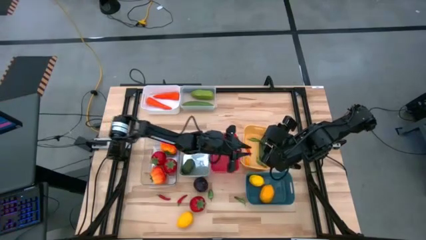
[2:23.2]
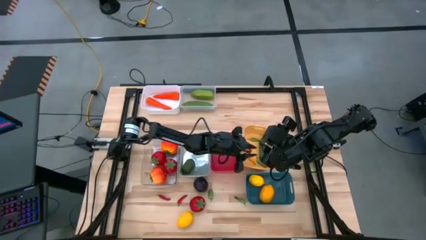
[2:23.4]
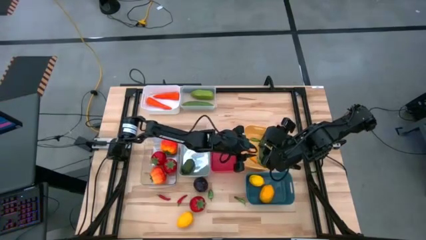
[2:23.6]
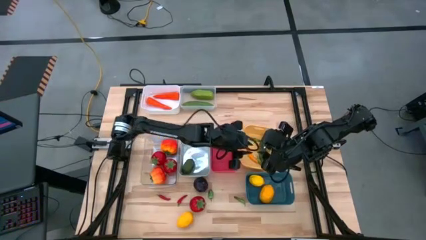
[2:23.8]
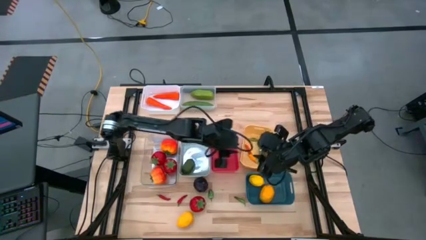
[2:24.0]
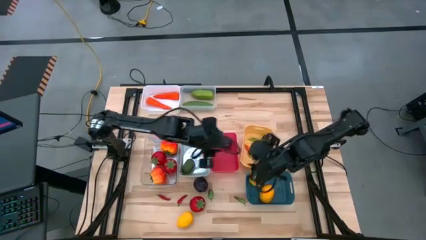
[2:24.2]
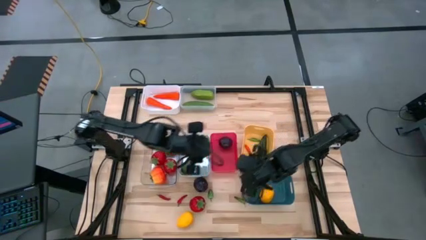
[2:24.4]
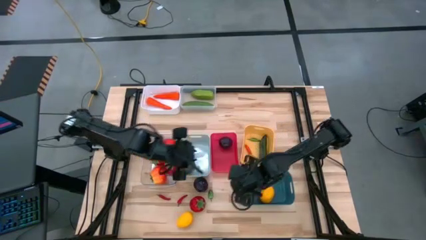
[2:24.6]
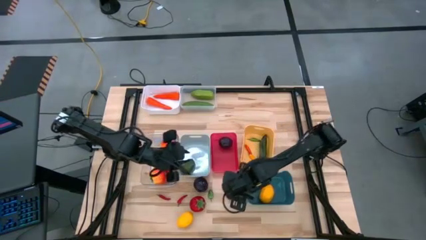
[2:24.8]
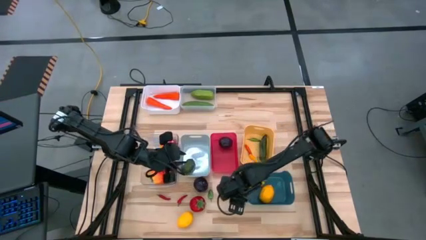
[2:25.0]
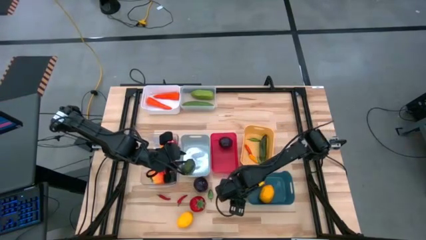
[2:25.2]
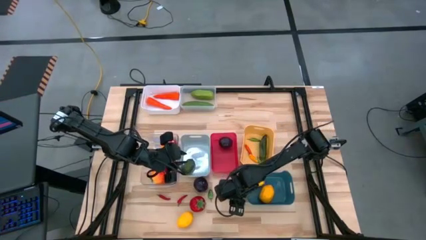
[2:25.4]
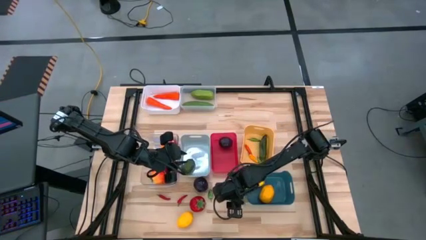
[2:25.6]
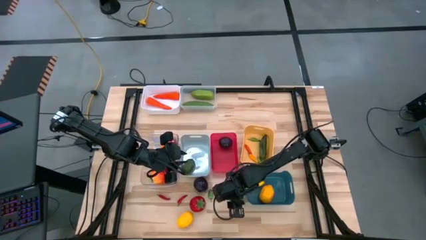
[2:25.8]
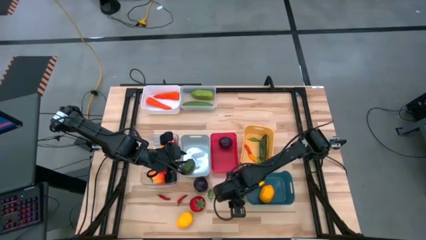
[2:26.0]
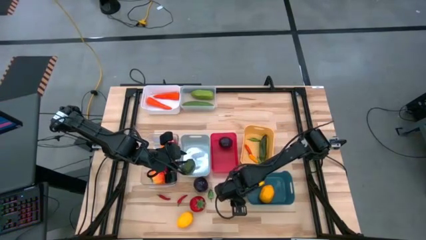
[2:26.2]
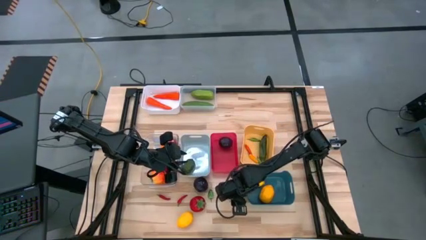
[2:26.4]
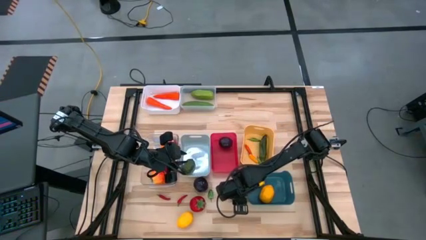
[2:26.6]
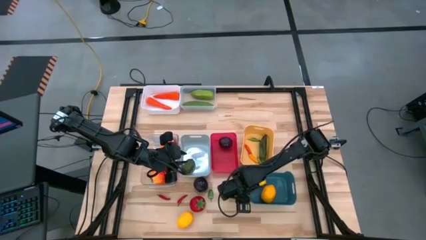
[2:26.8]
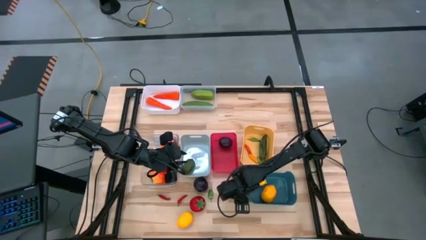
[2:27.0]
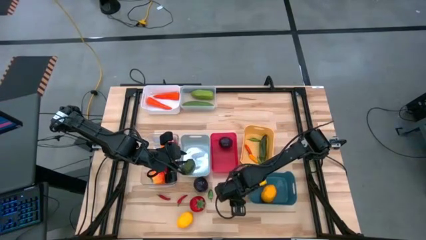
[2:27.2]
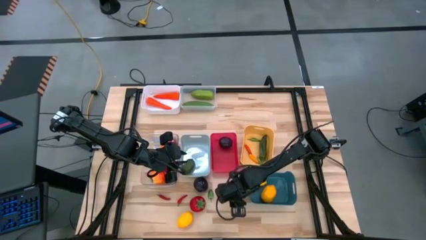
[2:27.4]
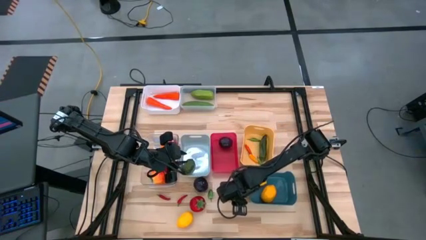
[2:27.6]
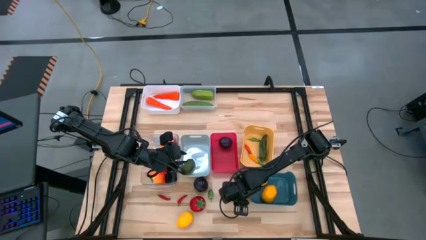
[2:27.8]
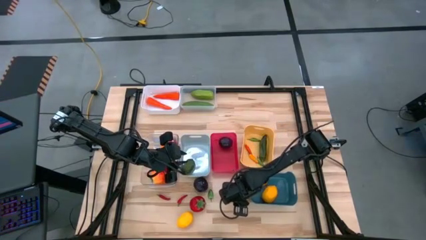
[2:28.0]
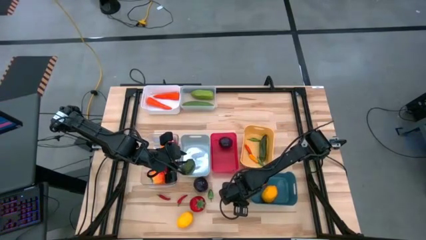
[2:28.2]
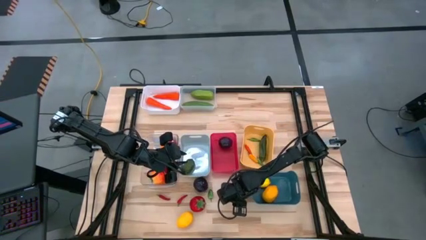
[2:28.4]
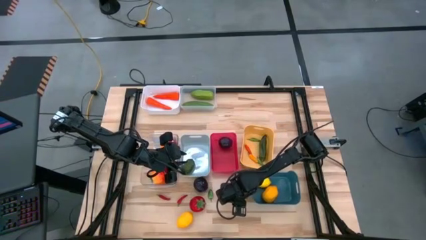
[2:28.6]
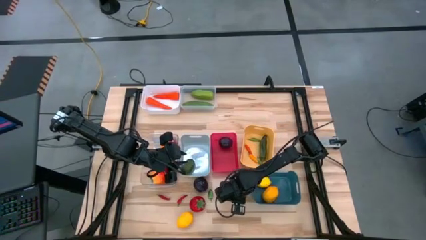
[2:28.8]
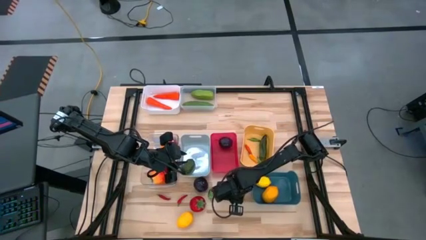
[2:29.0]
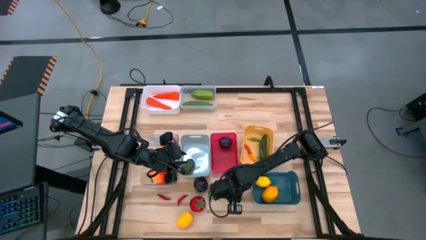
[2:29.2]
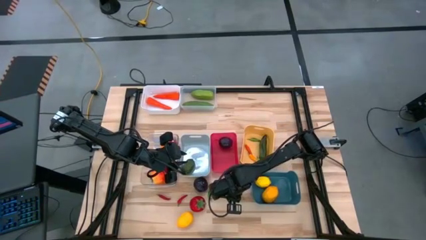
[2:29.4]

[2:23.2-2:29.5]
Task: Sort produce into baskets
Put the green chili pepper into the yellow bin

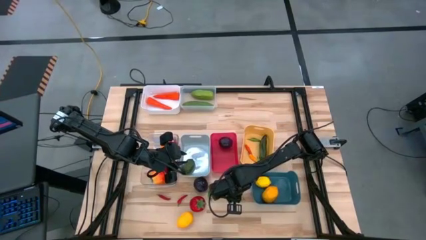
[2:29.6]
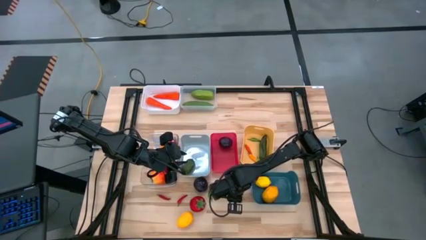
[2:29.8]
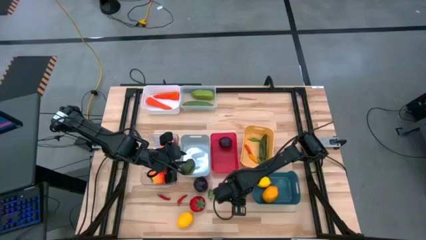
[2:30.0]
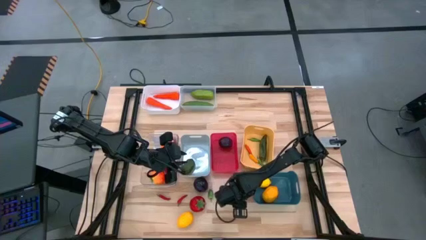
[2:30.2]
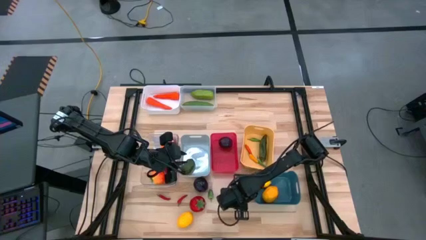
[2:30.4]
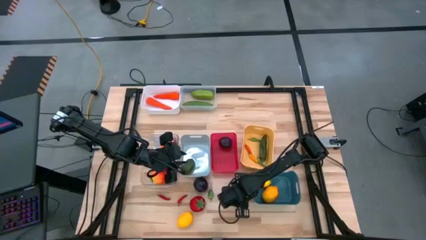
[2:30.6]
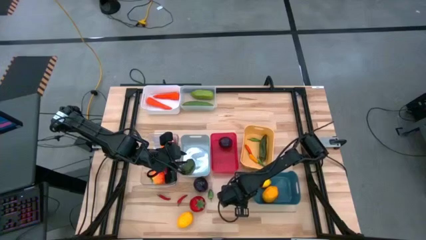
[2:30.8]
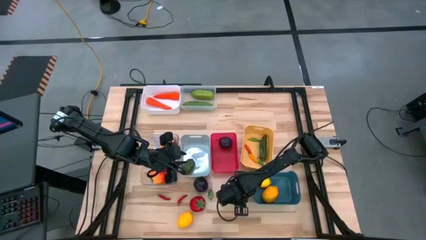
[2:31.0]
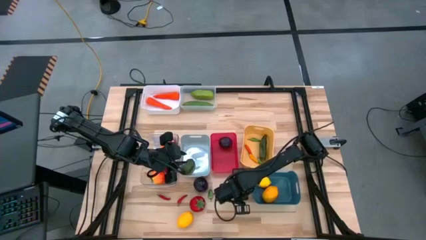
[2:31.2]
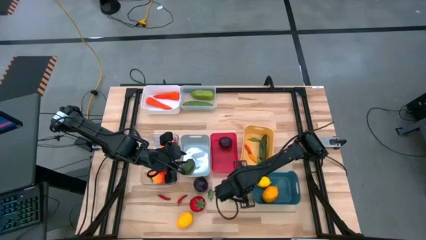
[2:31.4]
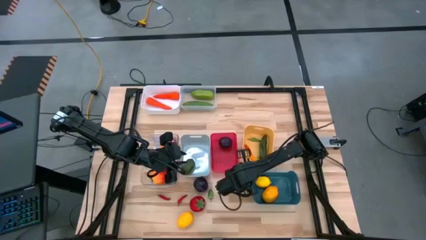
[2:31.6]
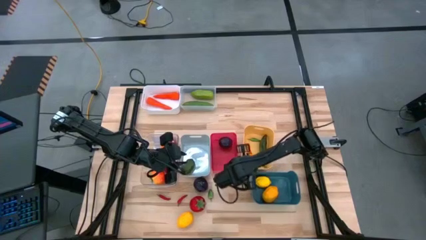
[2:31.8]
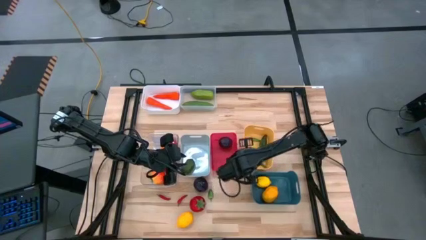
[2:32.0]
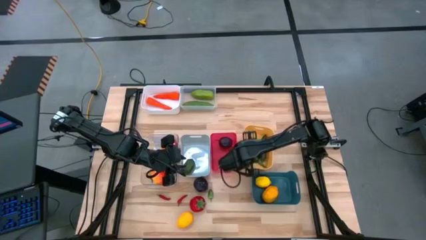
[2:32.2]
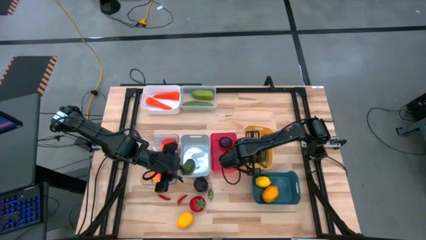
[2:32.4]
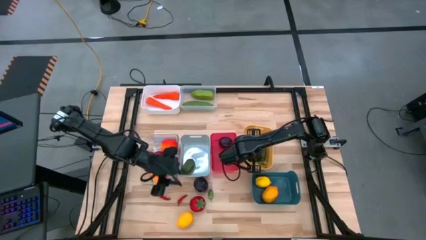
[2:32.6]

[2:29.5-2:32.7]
Put the green chili pepper into the yellow bin

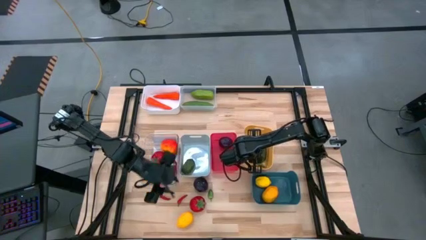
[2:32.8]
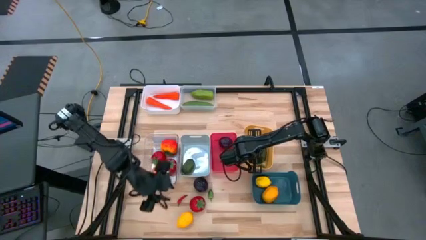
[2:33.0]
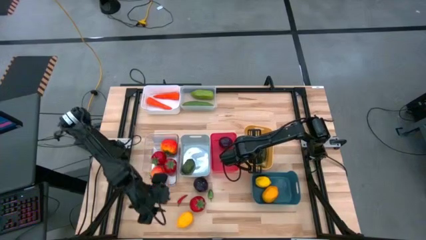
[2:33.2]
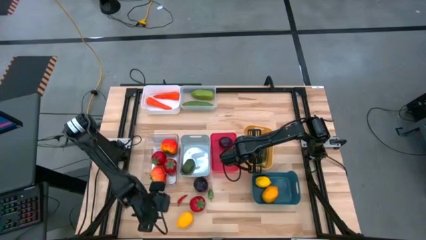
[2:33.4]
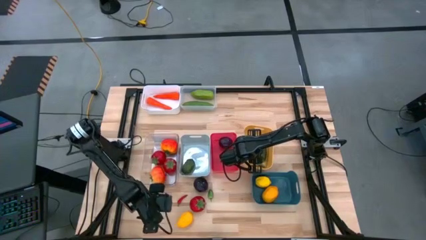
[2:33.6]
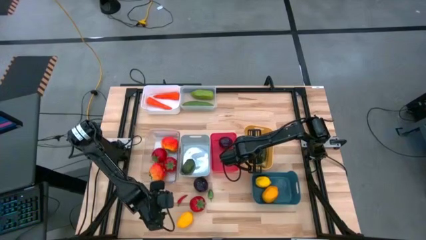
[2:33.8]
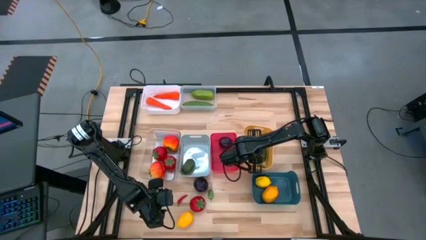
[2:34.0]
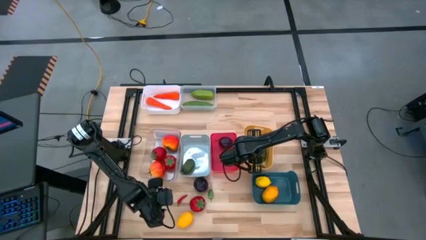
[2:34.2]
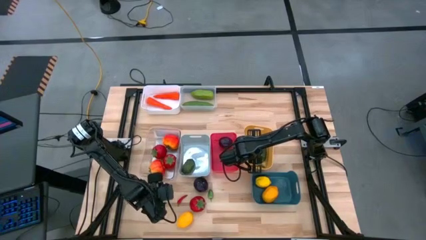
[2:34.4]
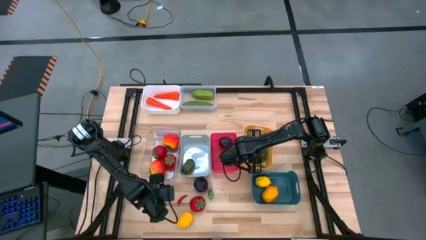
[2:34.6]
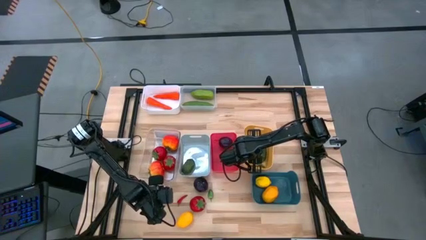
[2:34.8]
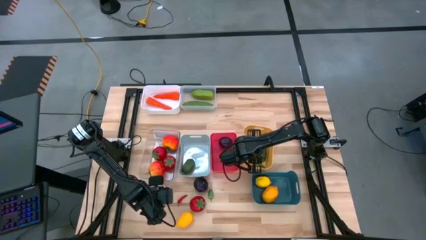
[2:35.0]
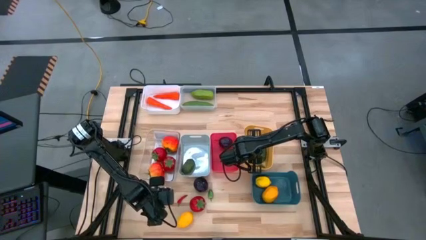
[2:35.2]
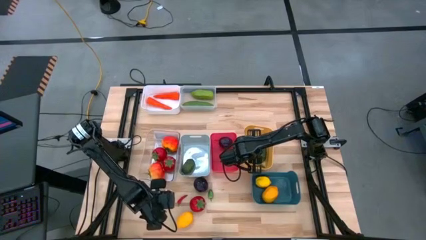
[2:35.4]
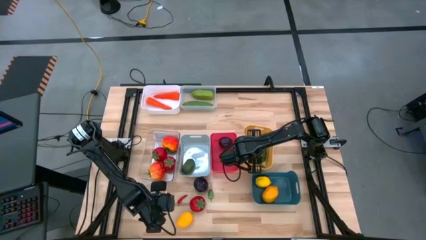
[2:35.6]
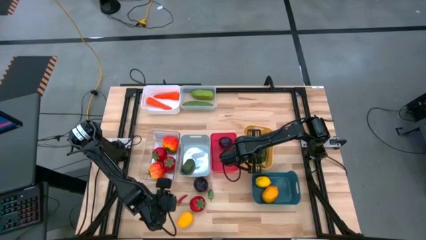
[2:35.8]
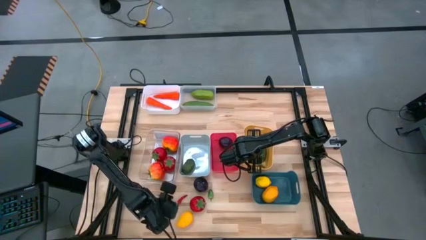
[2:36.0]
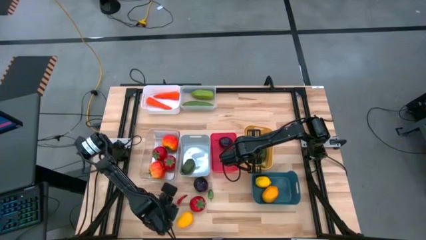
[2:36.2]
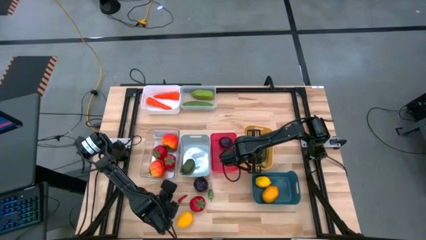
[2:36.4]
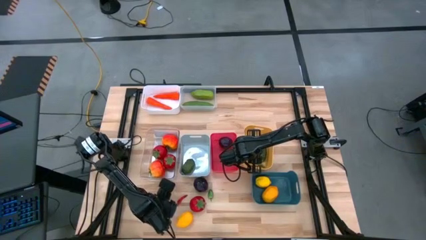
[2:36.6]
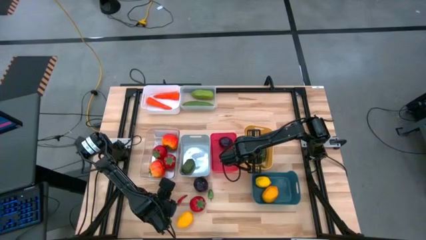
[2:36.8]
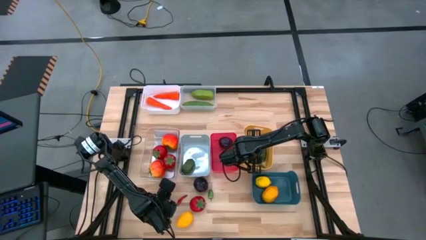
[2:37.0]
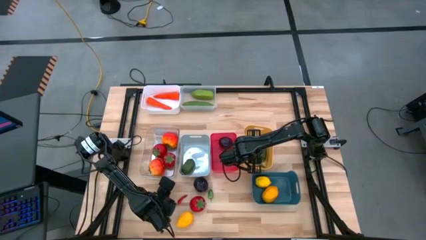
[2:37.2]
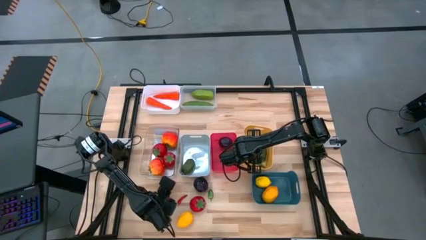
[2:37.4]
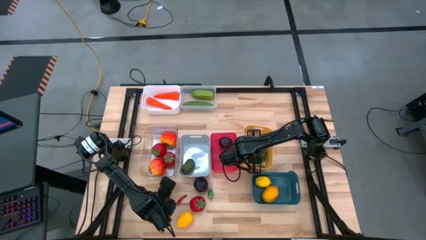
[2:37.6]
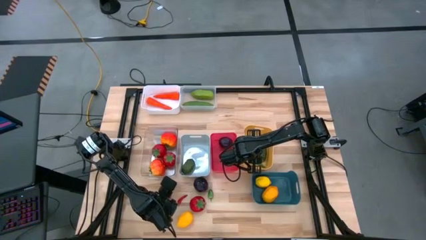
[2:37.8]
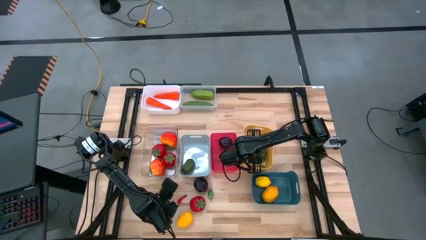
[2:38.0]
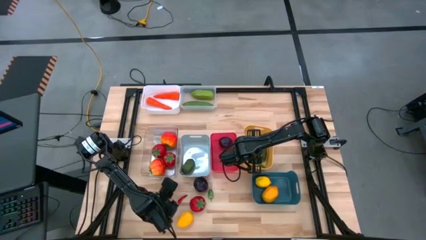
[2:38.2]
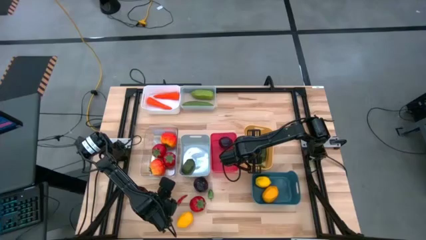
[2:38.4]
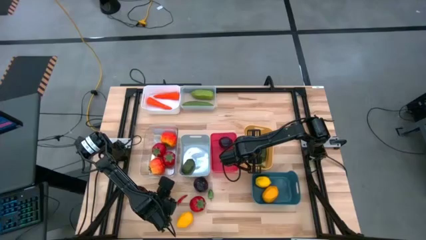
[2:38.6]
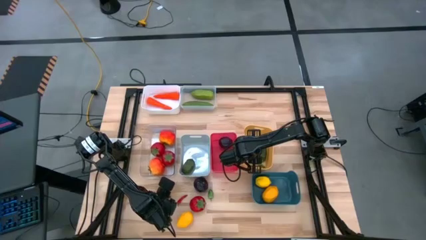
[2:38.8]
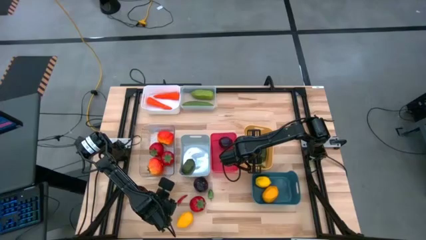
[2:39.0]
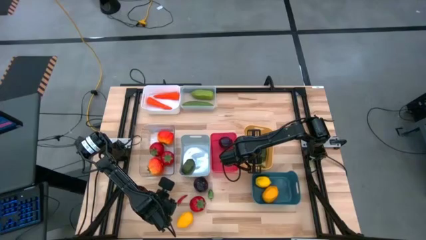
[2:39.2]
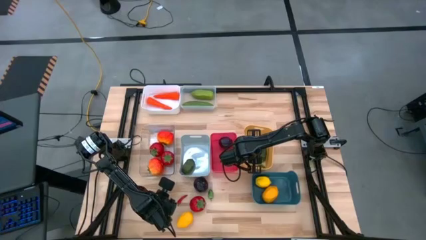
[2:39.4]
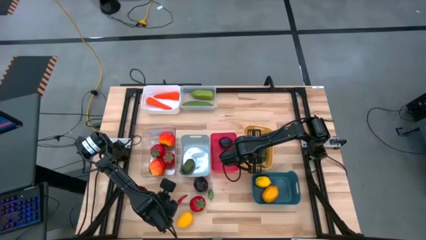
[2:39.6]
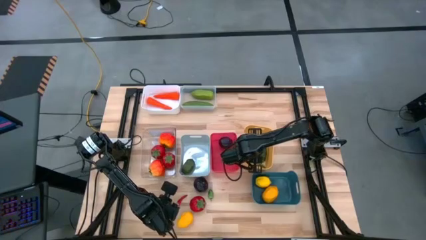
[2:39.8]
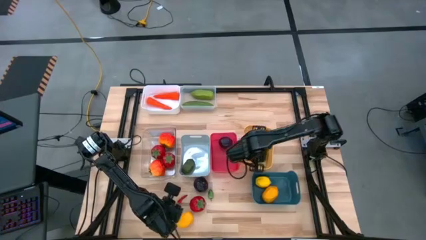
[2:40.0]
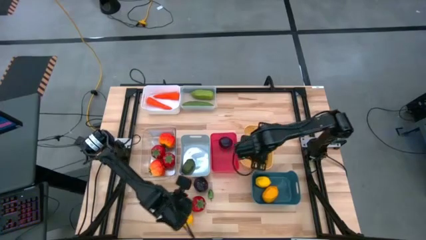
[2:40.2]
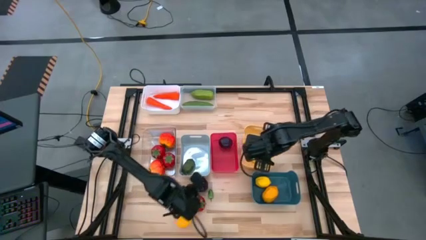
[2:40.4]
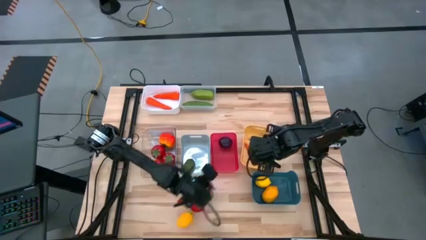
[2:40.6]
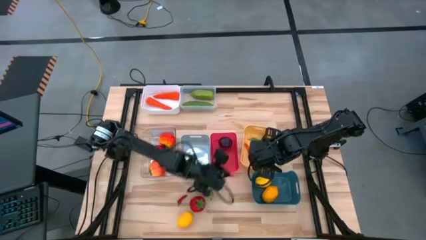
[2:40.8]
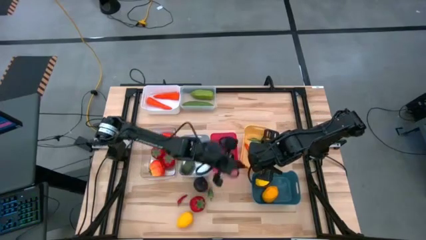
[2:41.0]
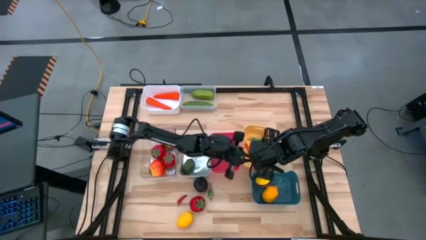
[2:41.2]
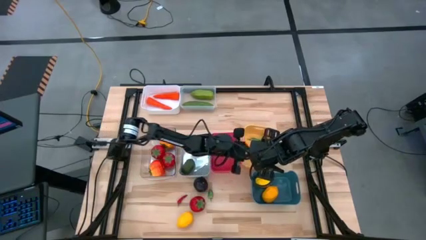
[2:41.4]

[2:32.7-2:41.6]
Put the red chili pepper into the yellow bin
